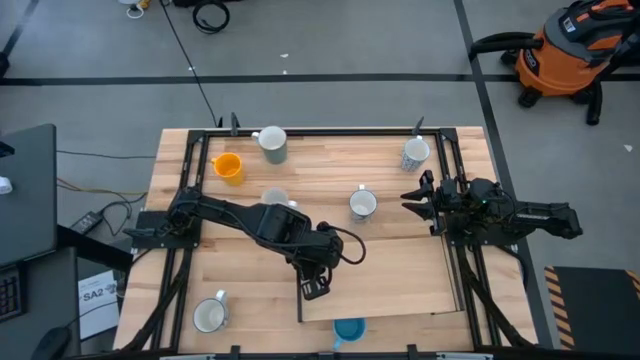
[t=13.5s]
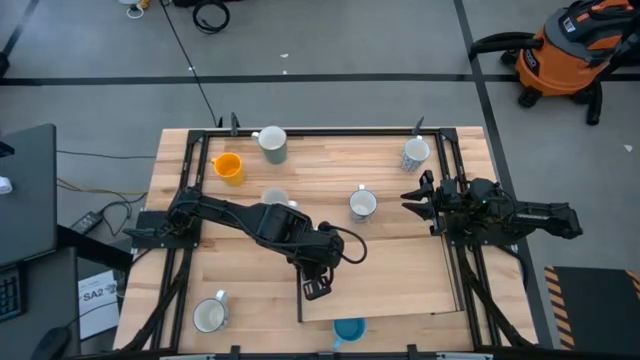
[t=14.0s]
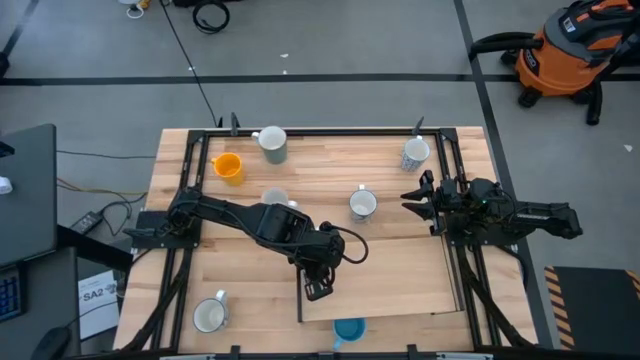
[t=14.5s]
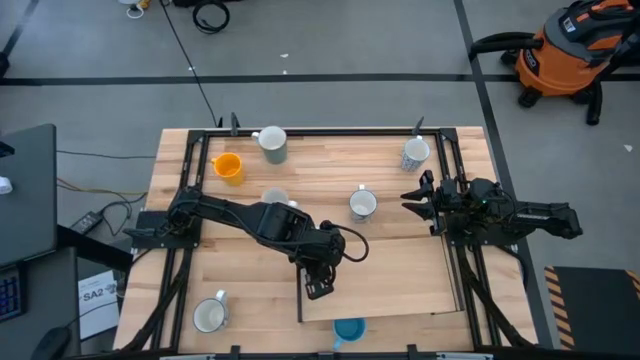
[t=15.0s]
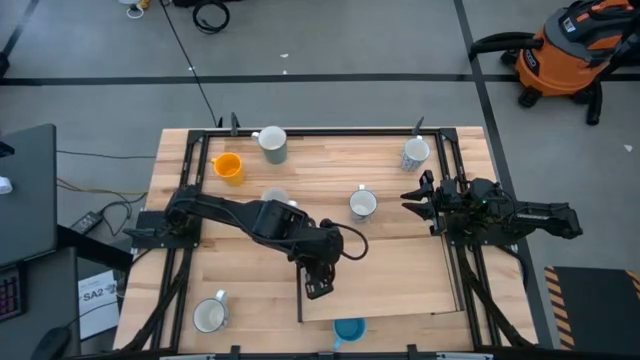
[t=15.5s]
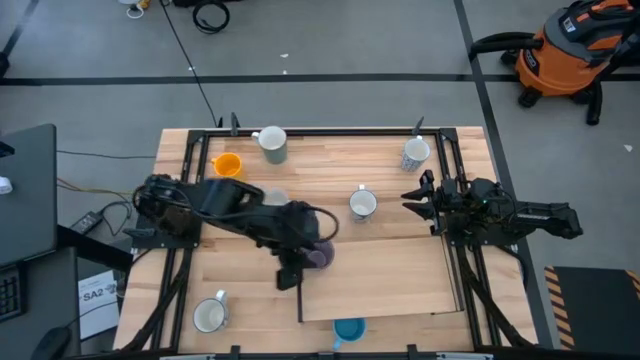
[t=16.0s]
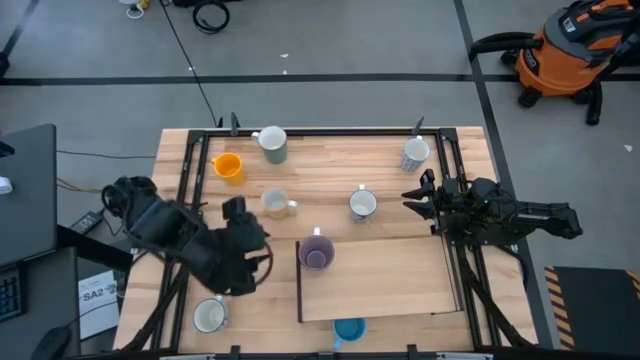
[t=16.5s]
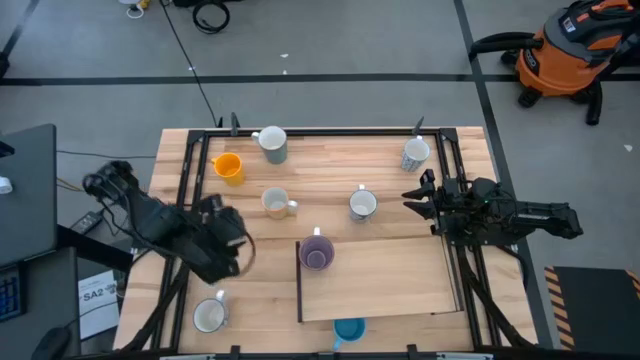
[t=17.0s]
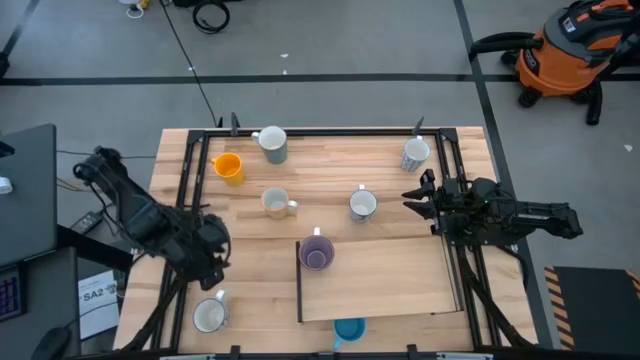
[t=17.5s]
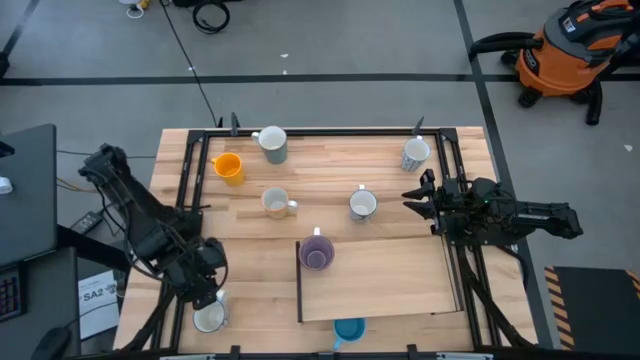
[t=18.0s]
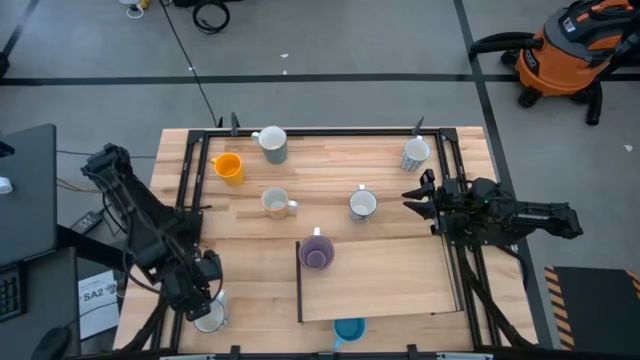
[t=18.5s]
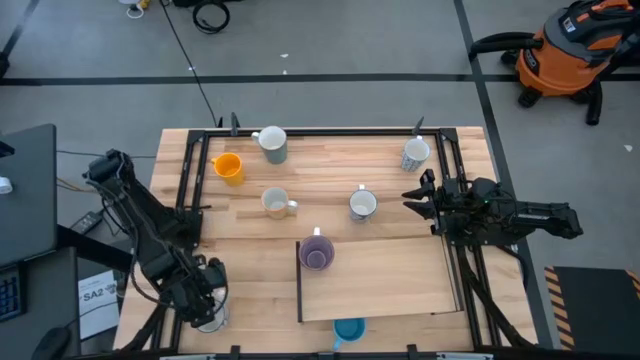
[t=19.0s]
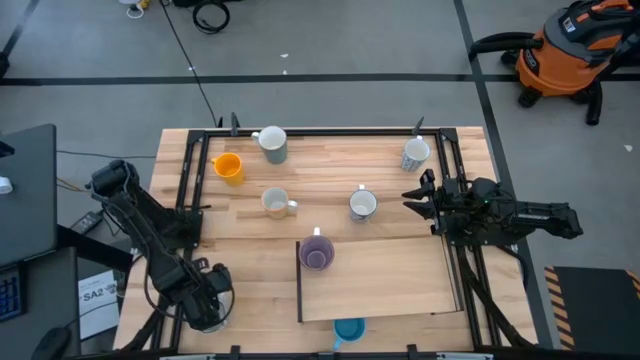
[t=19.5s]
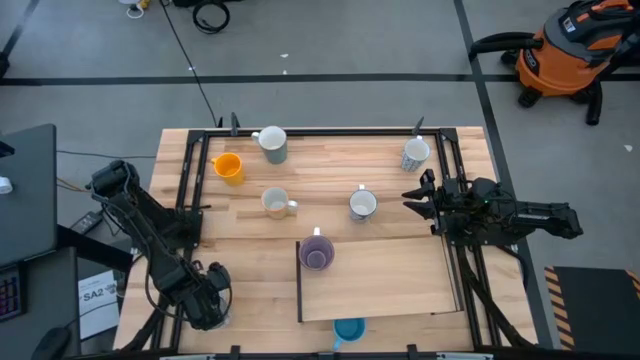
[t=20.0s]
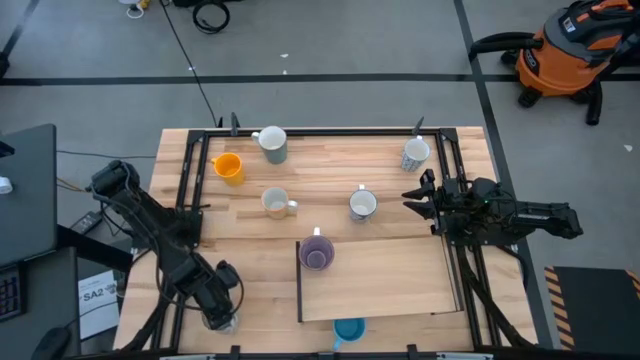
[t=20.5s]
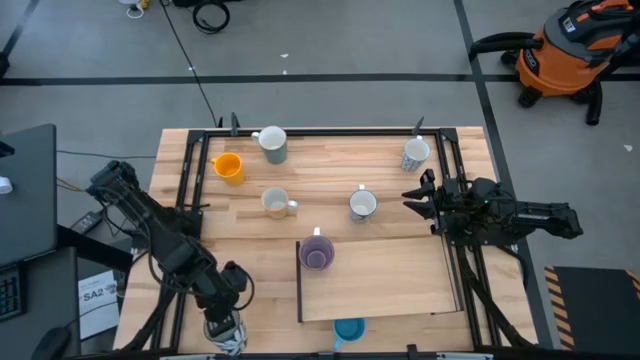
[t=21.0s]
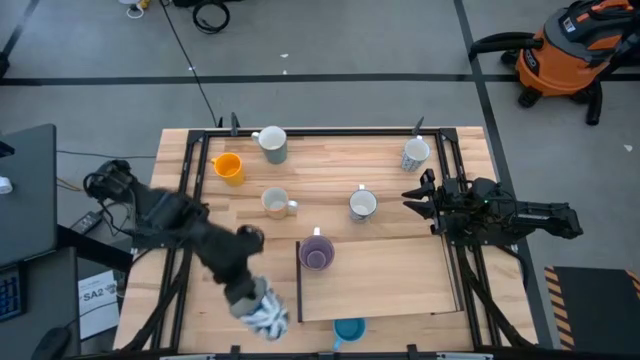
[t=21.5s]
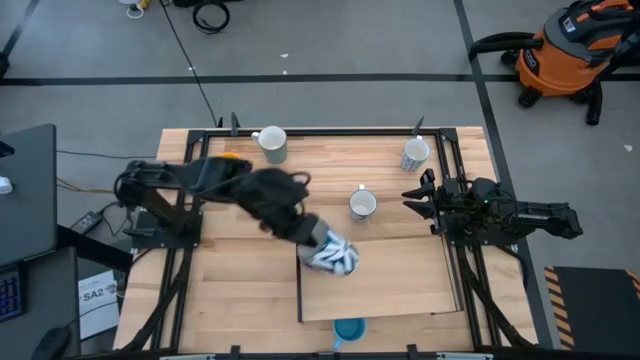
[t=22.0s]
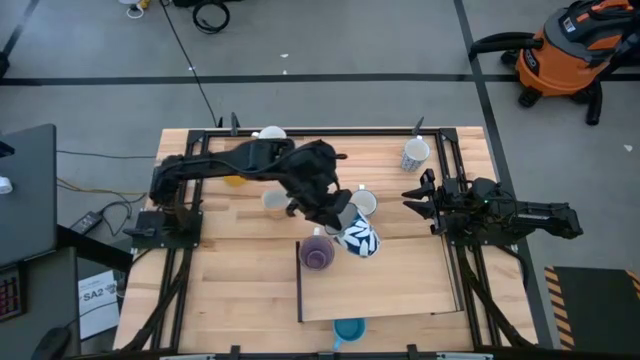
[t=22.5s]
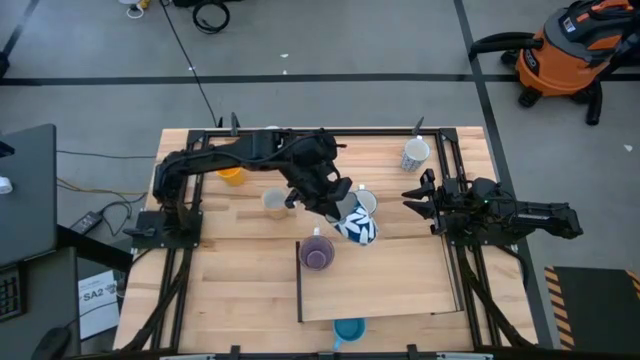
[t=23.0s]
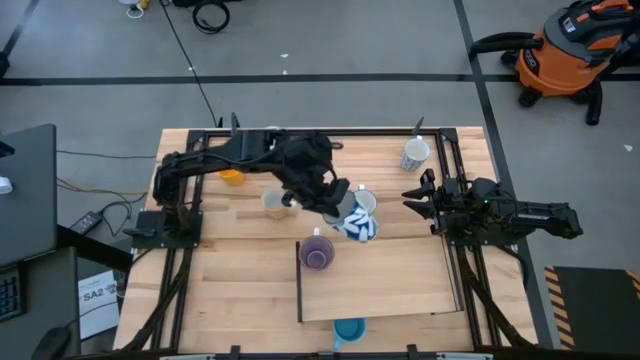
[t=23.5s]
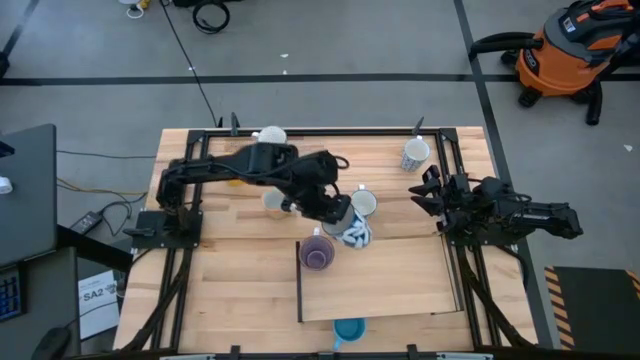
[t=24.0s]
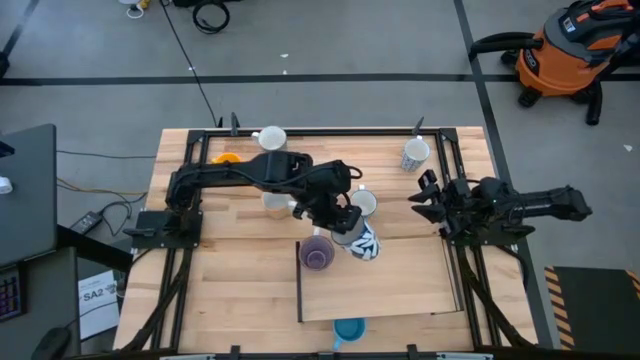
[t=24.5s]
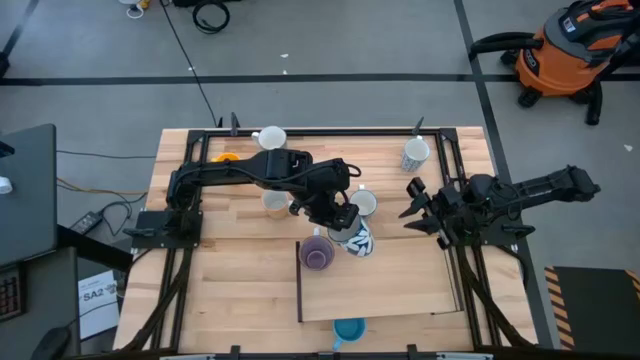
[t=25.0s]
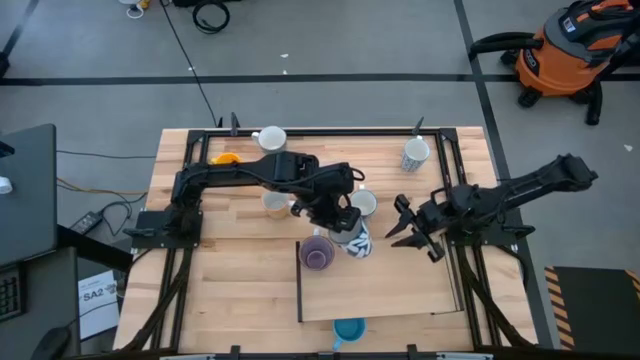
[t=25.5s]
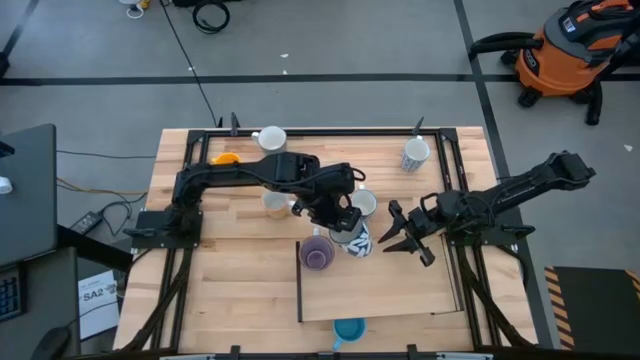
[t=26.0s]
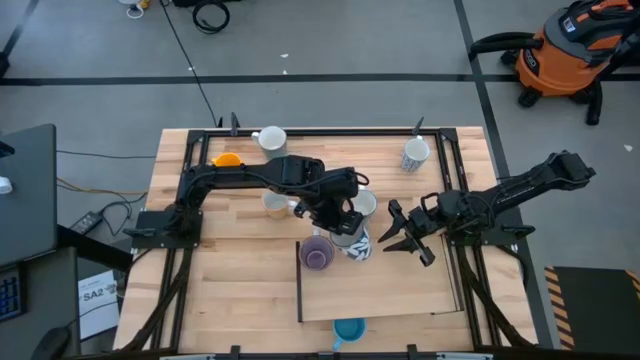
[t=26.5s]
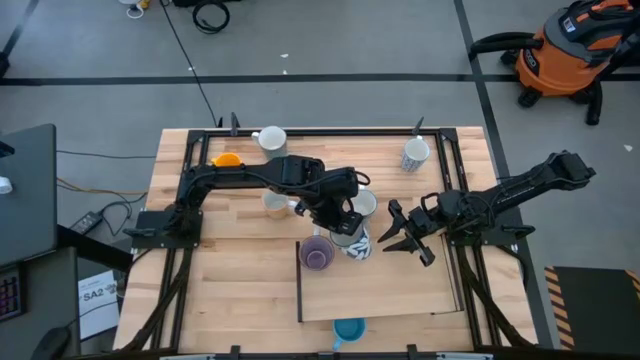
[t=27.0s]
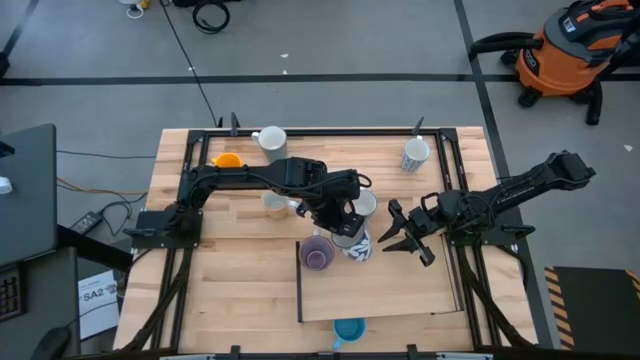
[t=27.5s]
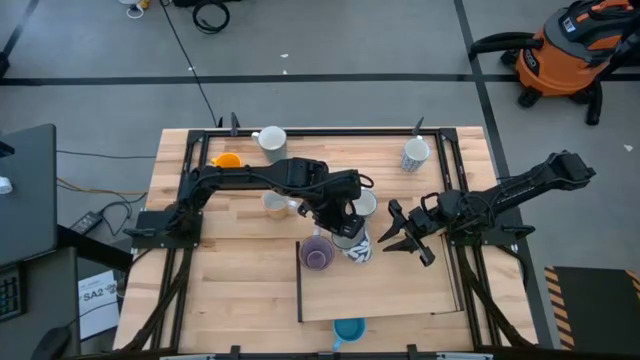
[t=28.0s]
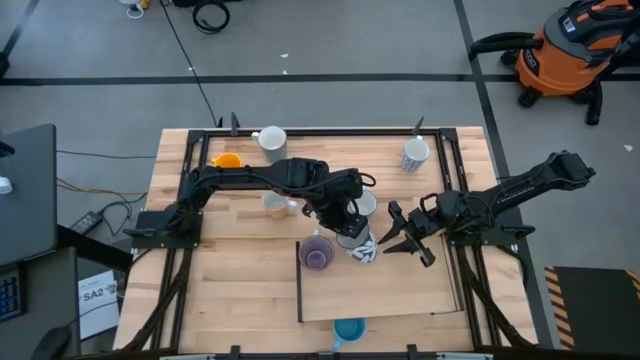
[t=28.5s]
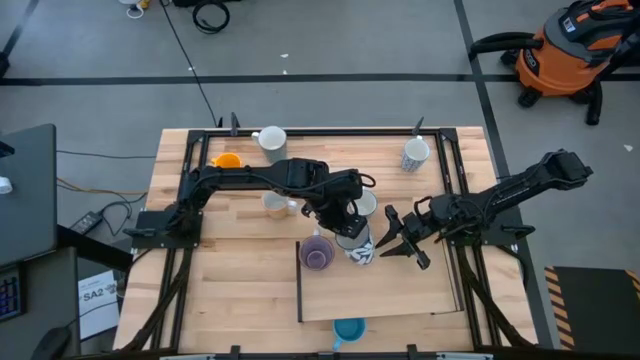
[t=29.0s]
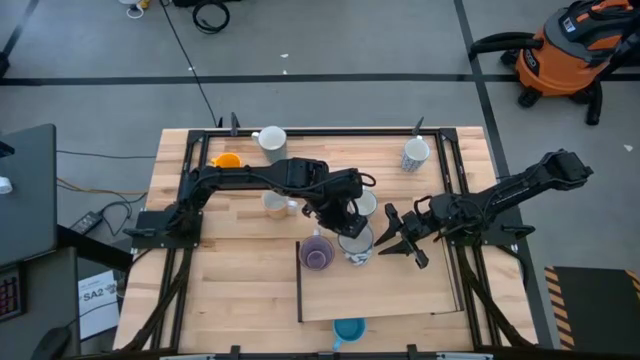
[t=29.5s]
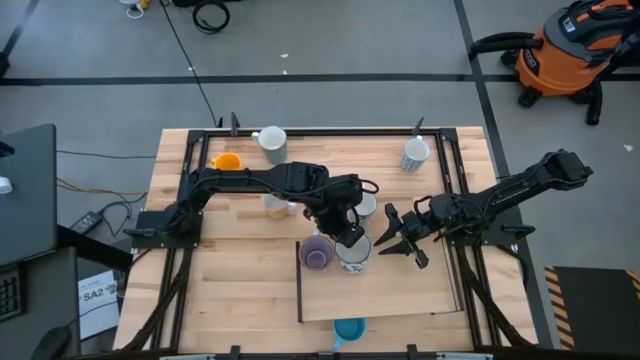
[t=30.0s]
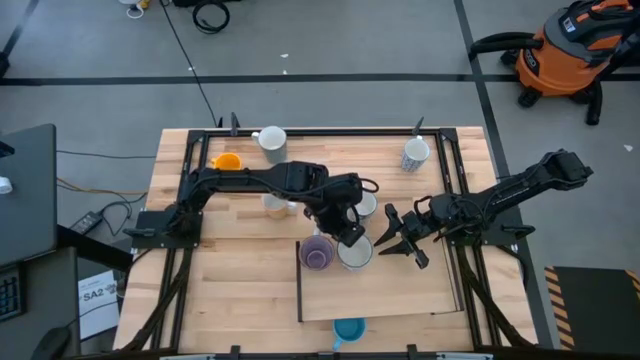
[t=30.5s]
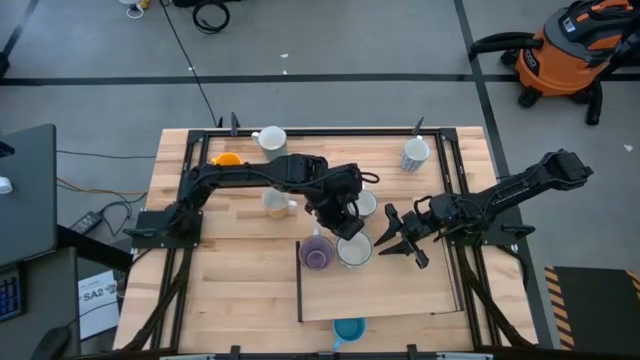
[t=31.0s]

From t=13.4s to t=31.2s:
Task: Place coffee mugs
Put the bottom white blue patterned mug on the shelf

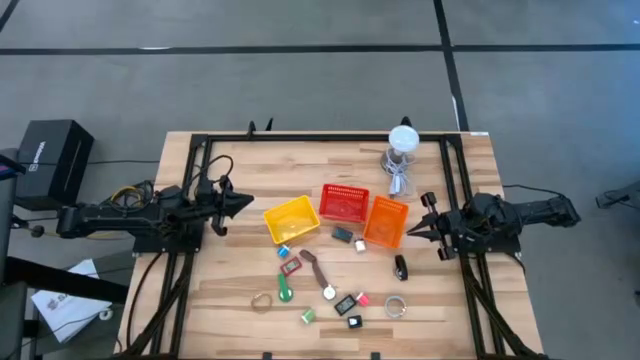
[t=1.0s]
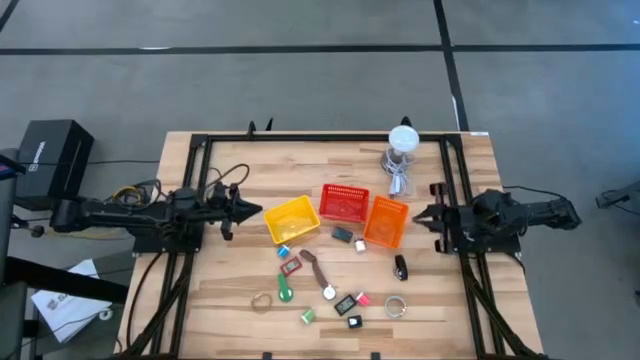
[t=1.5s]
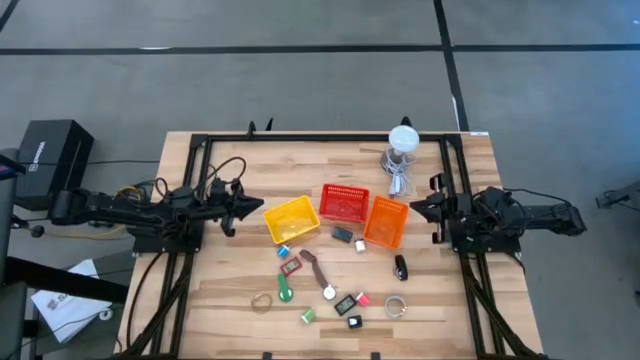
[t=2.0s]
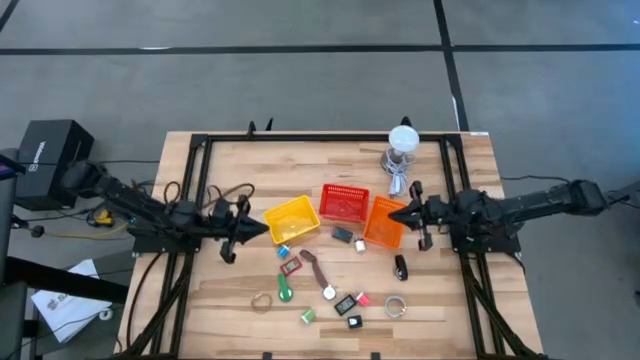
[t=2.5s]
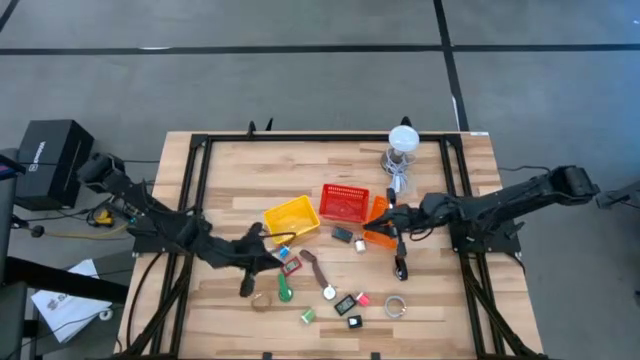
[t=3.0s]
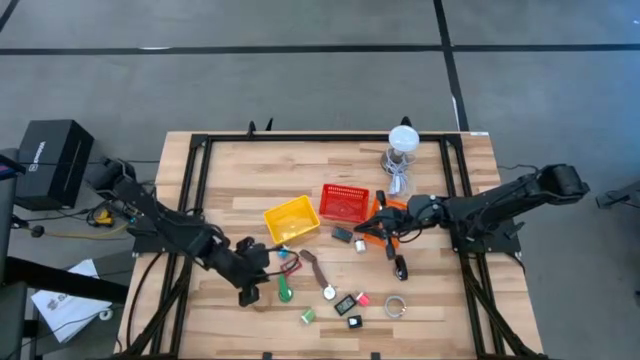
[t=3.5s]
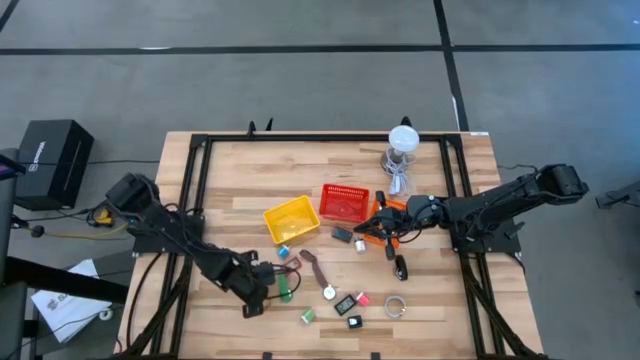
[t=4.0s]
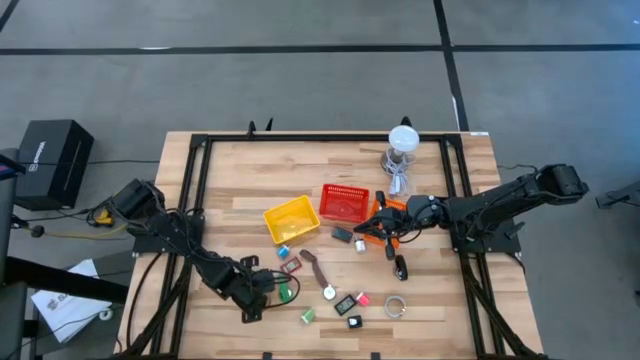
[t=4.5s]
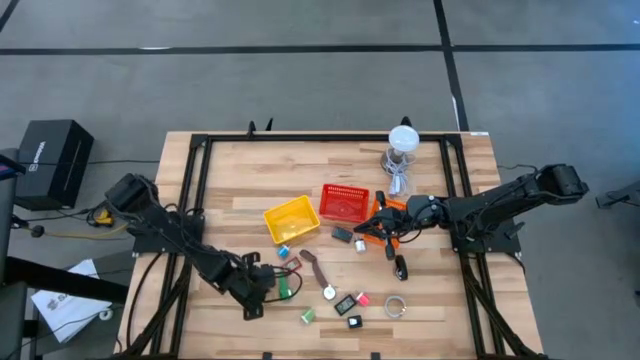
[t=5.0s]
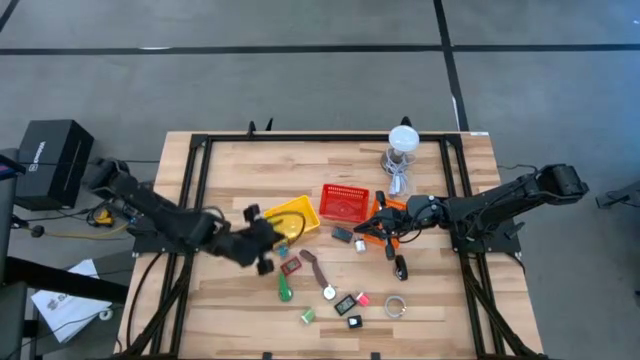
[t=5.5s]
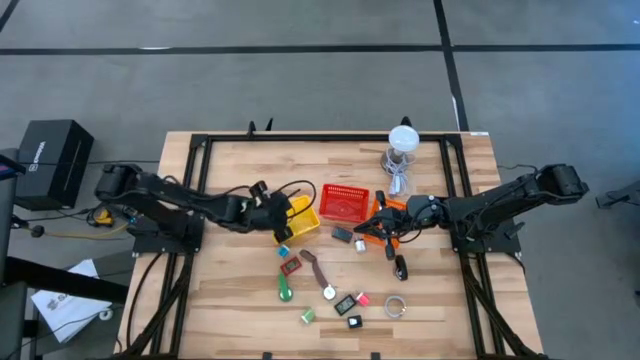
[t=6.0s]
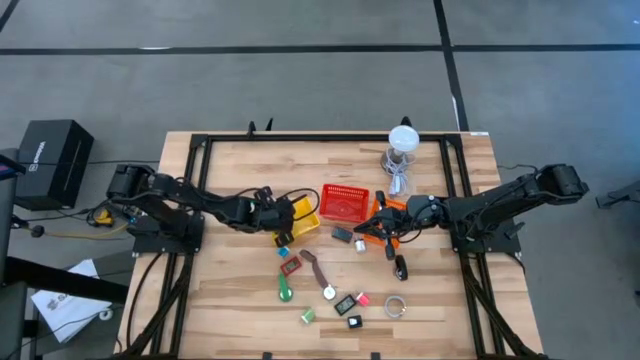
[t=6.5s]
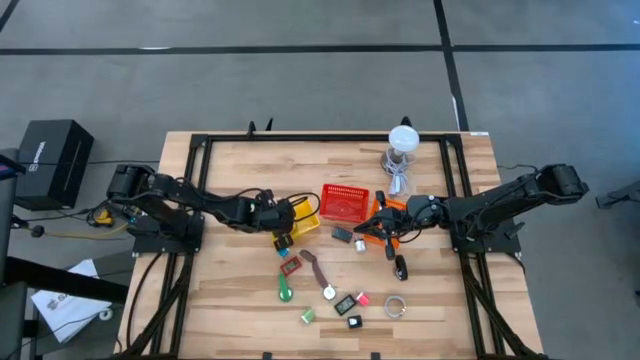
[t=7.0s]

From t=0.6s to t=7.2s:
Task: Pick & Place Office items
Put the gold watch into the yellow bin
